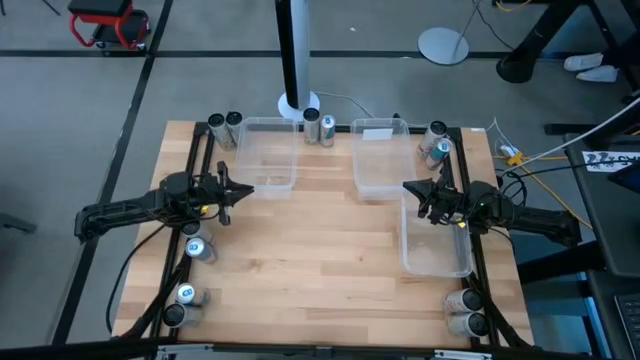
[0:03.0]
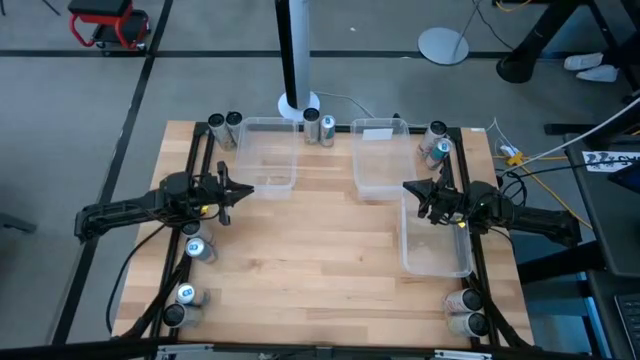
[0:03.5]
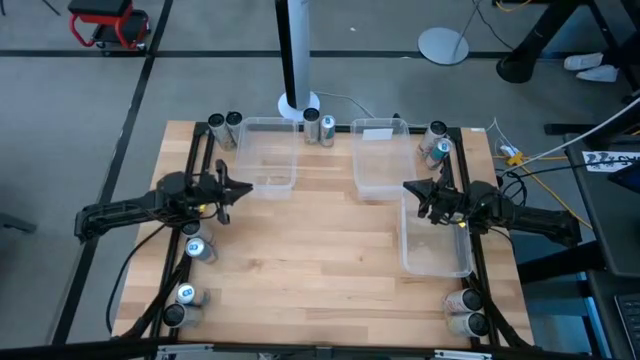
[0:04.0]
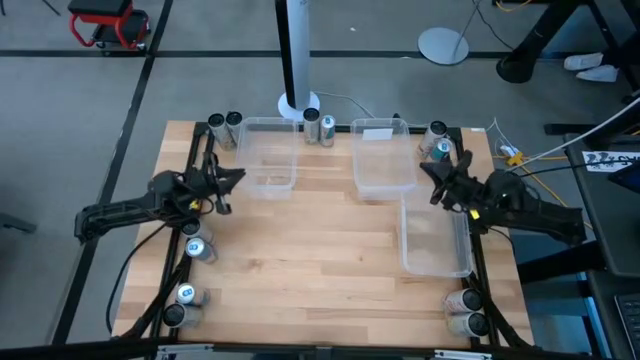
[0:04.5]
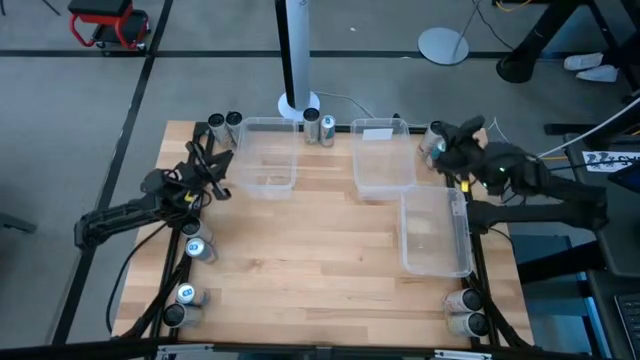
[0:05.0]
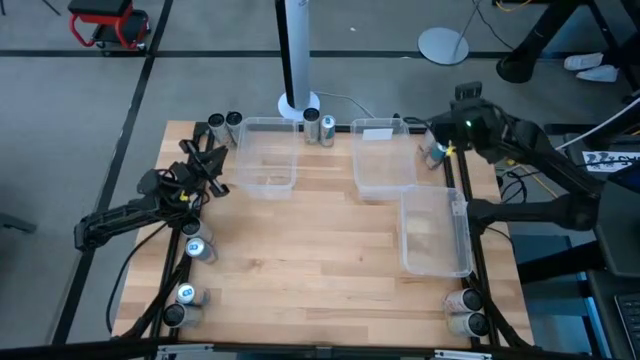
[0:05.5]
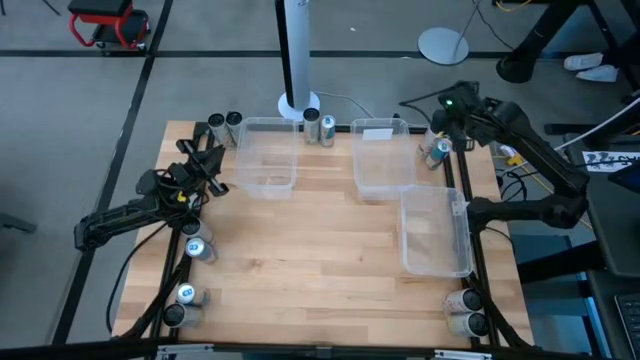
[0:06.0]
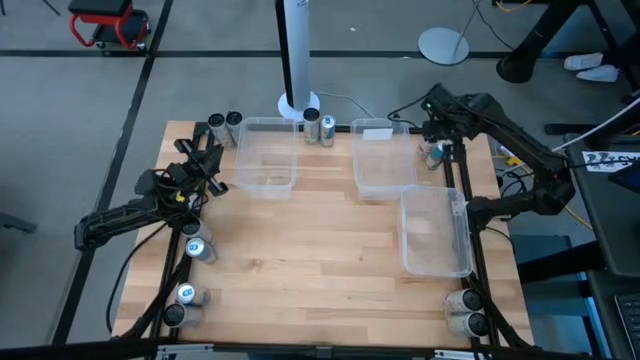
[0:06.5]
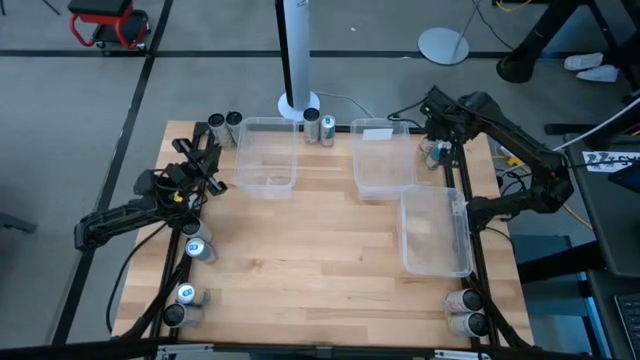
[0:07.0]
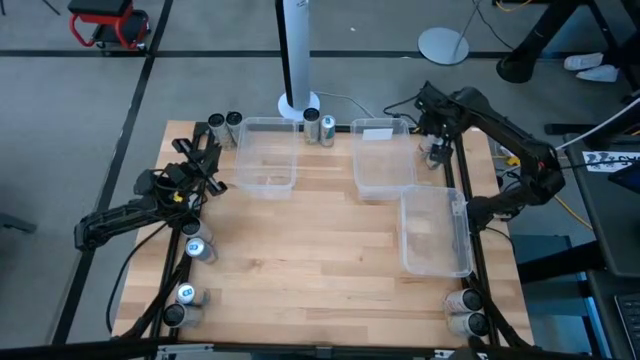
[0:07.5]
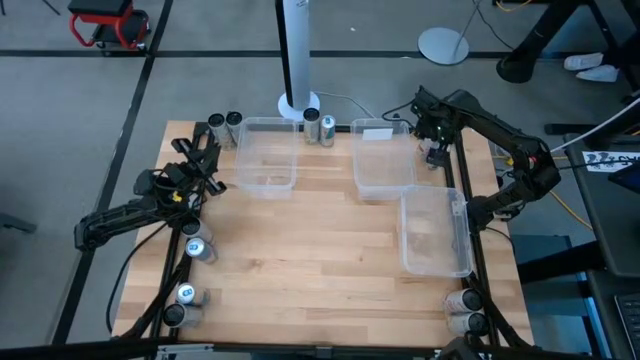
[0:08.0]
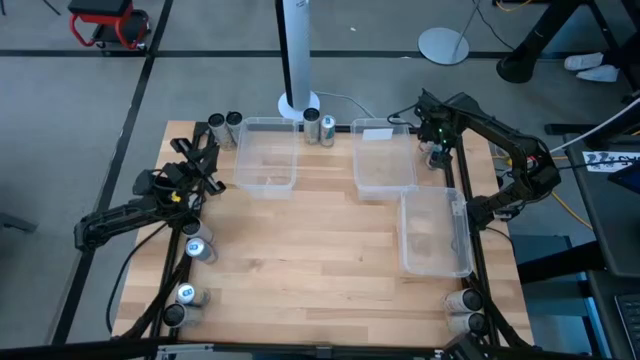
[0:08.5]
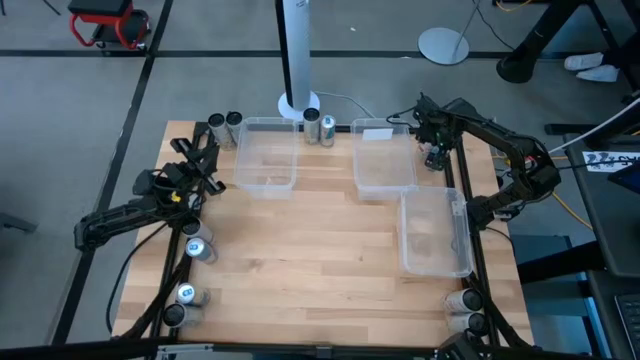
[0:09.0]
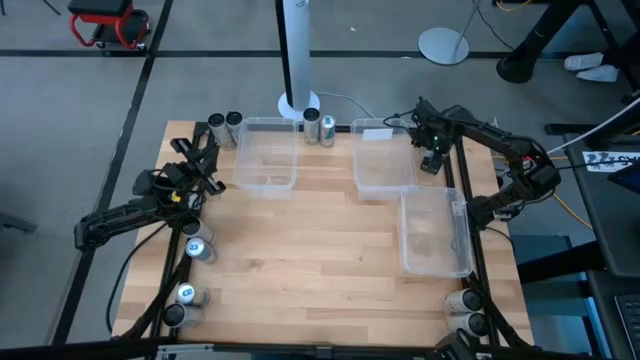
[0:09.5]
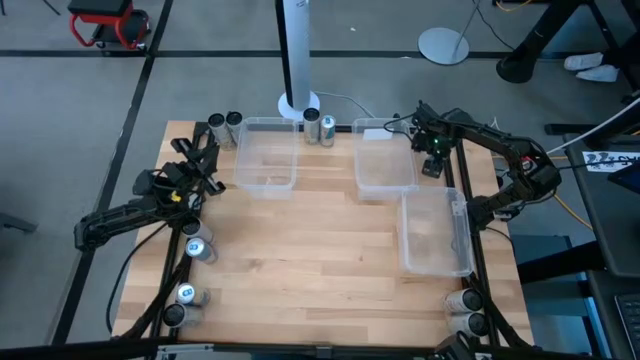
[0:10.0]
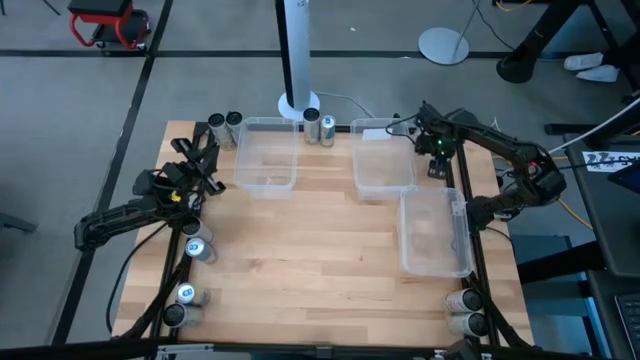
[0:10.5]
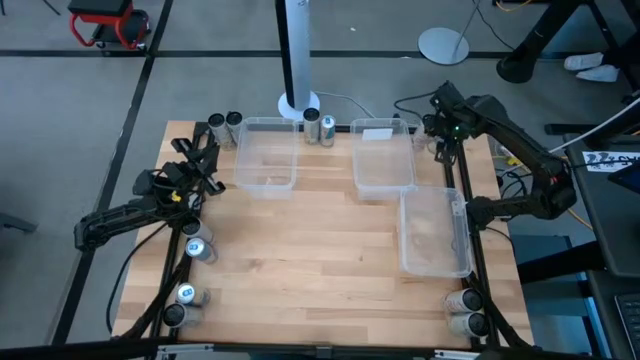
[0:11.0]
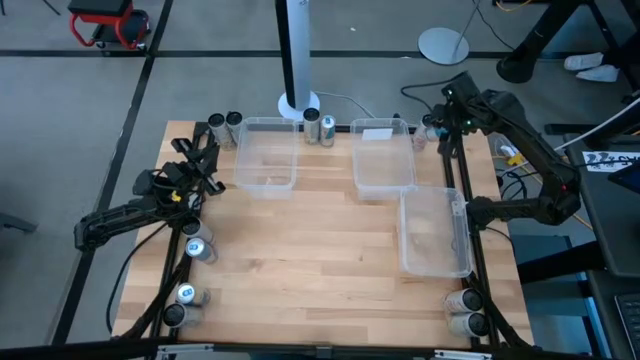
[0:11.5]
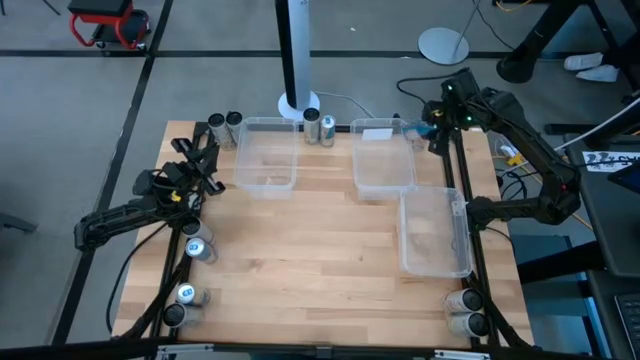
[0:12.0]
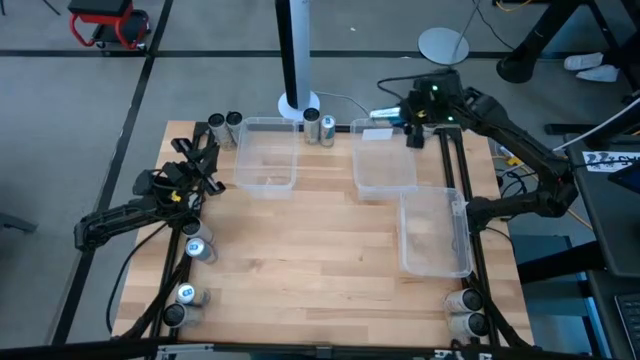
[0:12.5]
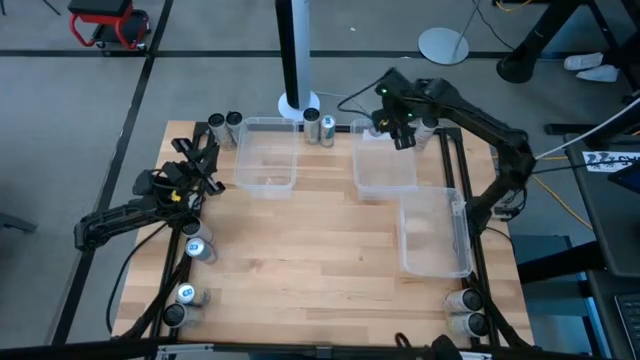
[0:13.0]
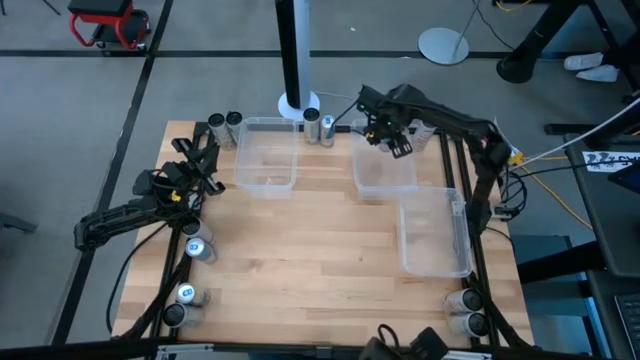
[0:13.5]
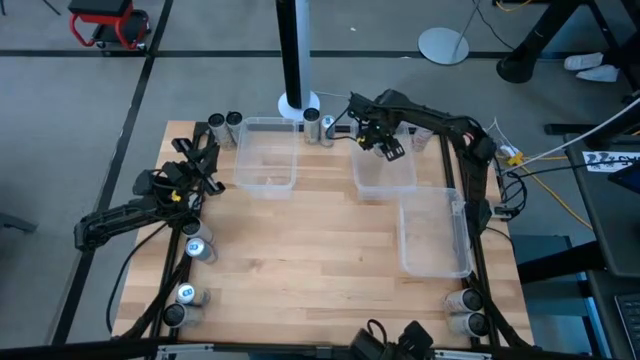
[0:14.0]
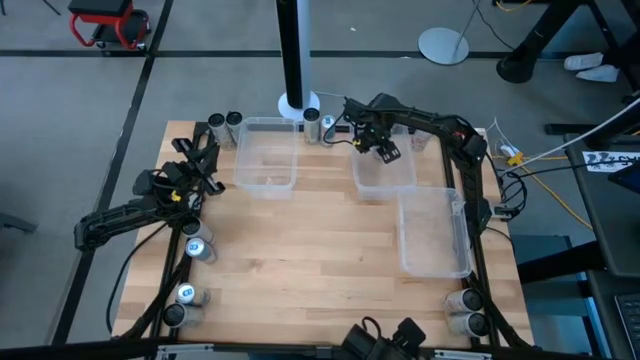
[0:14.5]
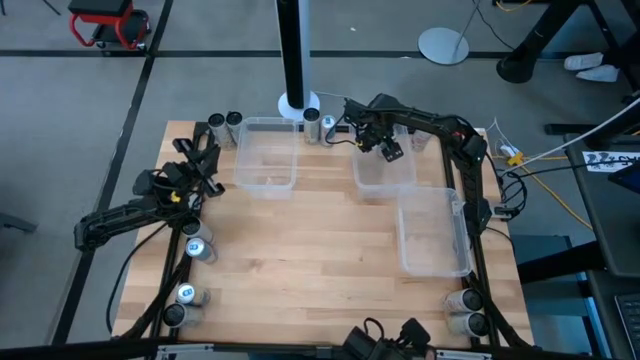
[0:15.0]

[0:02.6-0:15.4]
Task: Sort soda cans
Put the blue soda can into the top right transparent bin

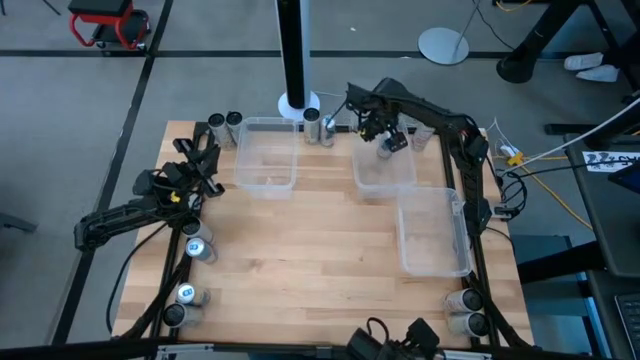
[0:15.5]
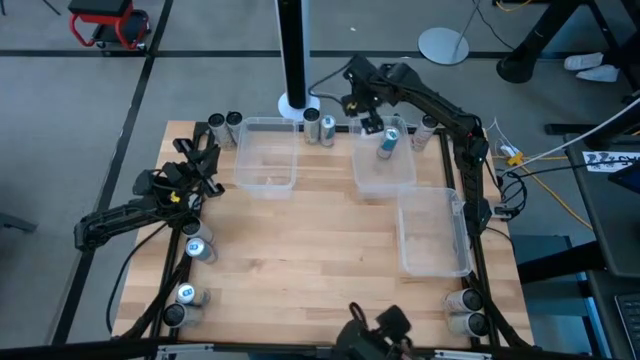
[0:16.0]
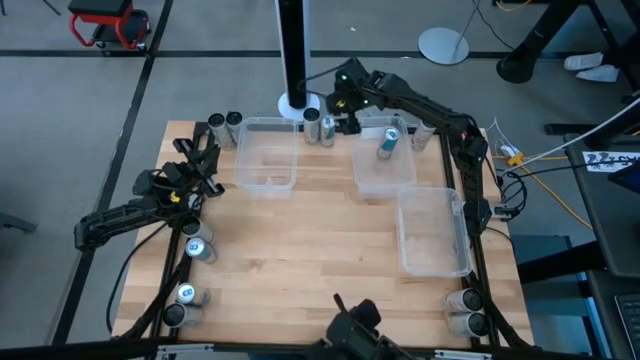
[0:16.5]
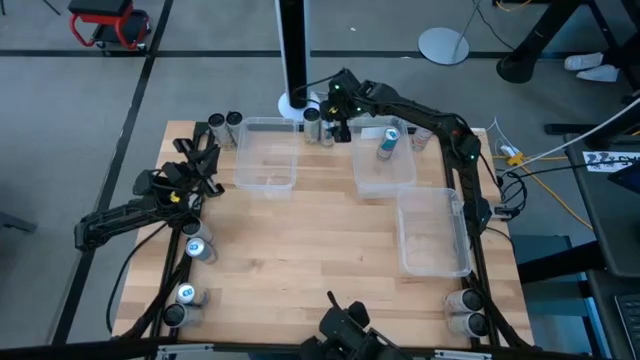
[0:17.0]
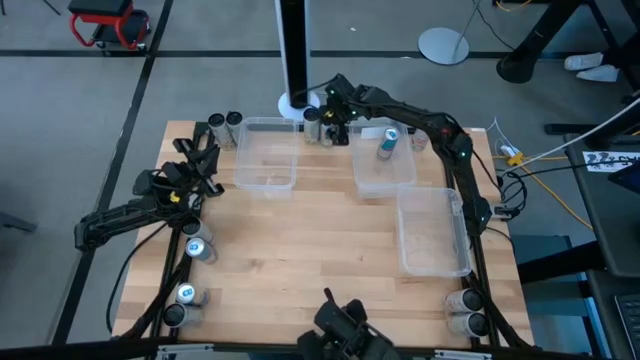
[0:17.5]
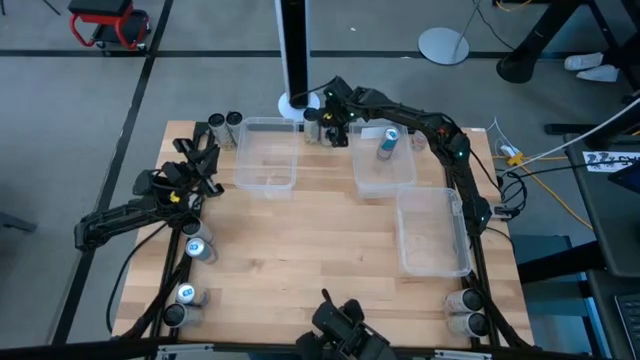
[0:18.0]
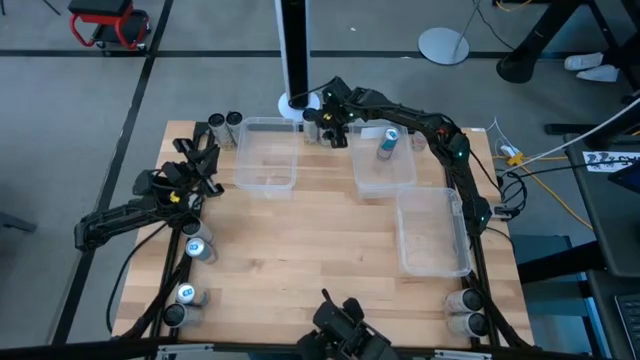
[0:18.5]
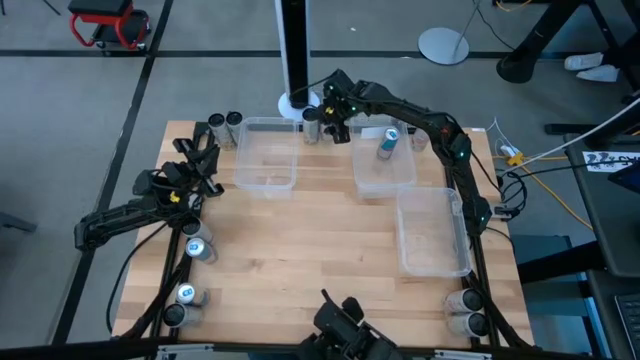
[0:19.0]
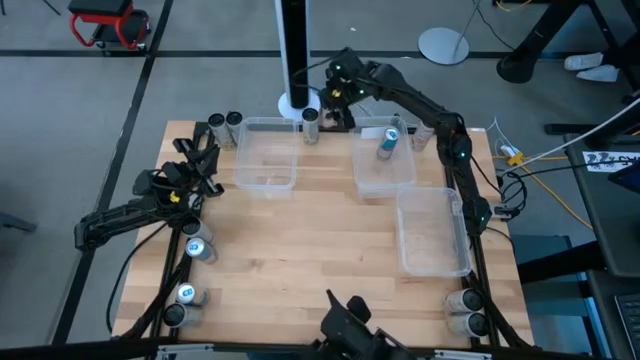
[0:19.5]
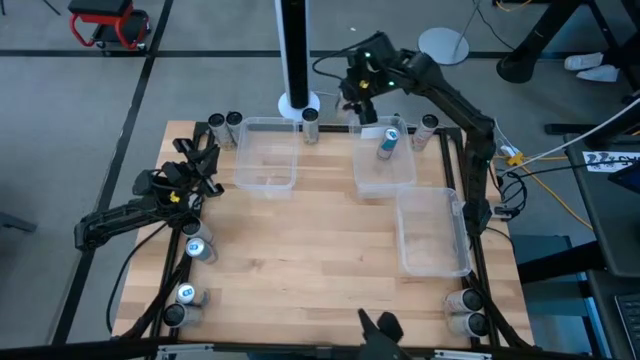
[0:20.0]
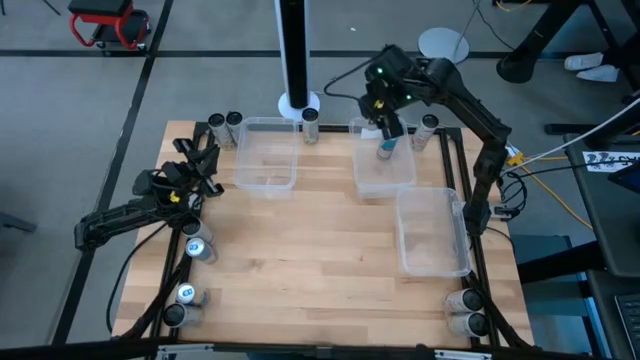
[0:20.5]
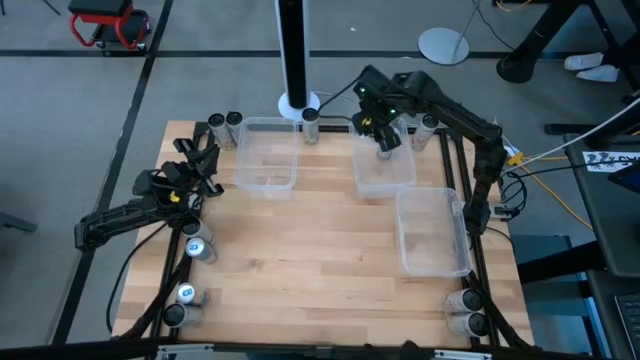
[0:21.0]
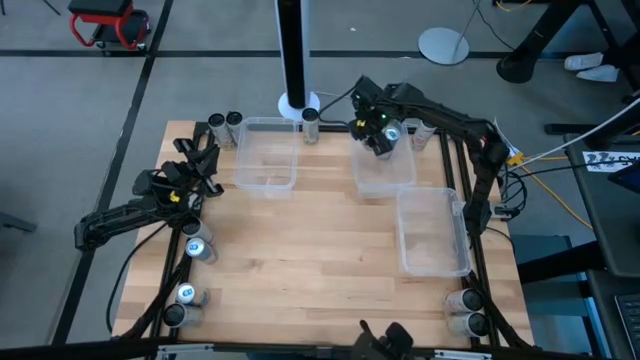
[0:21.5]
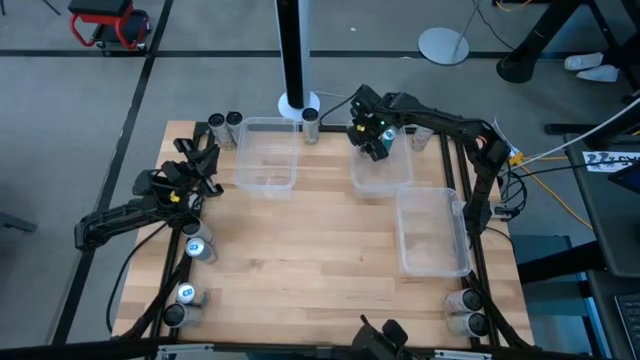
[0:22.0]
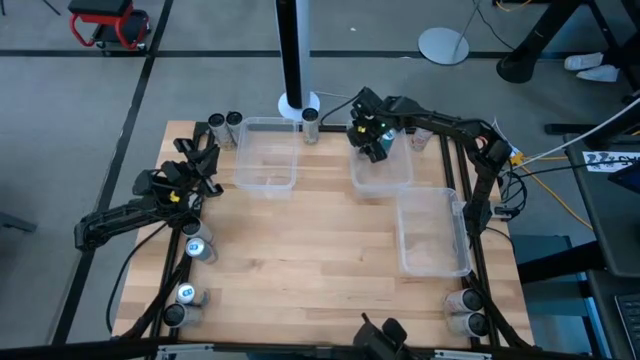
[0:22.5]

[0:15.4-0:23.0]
Put the blue soda can into the top right transparent bin

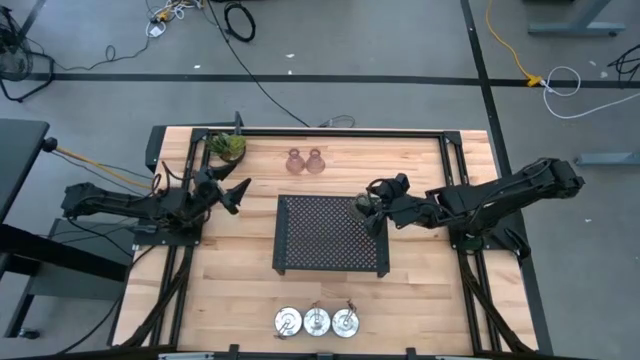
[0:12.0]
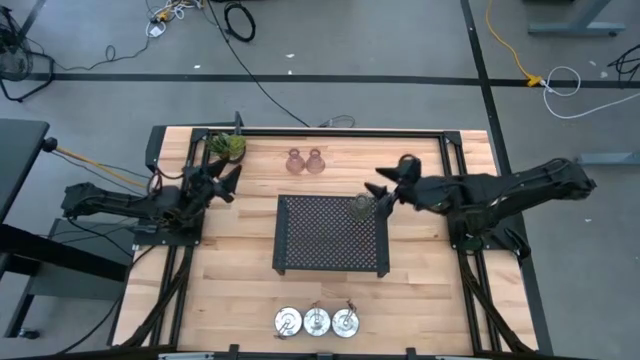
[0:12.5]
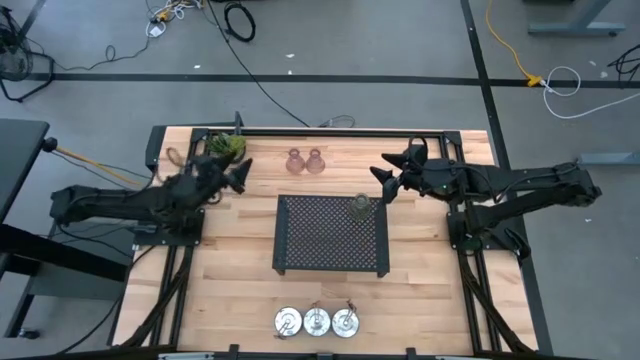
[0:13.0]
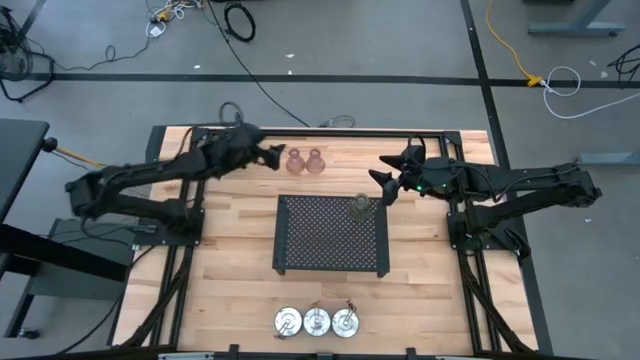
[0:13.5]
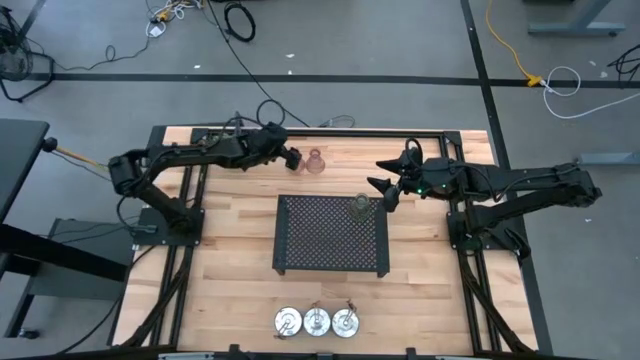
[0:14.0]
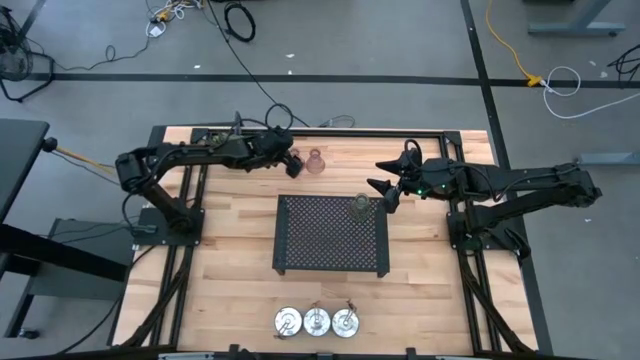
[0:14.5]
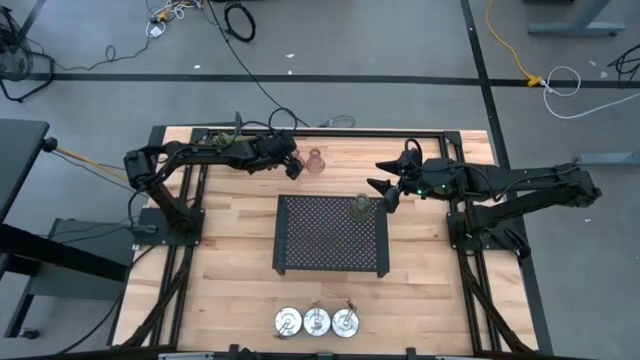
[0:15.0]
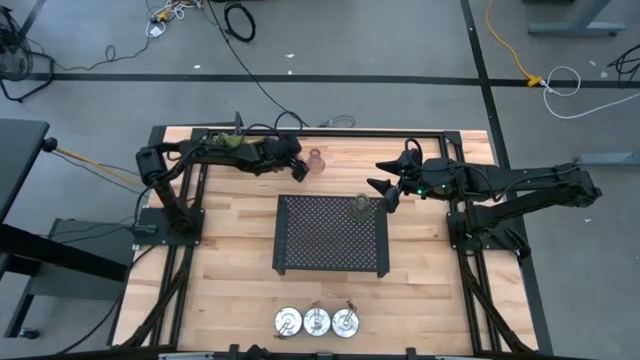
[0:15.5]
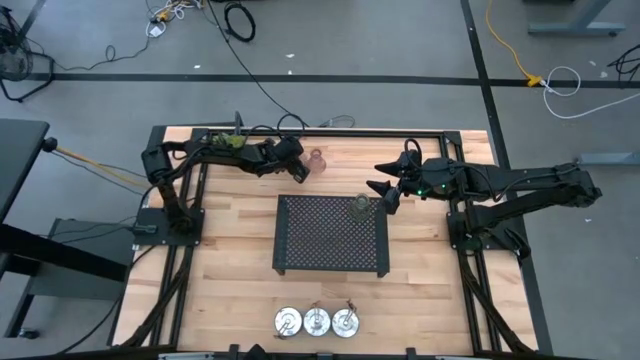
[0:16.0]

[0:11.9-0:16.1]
Task: Pick & Place candle stick holders
Put the left pink glass candle holder on the shelf
